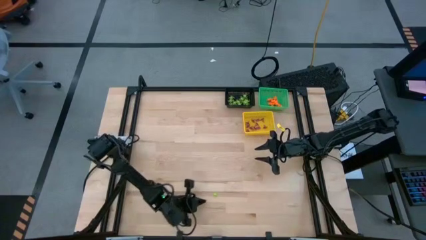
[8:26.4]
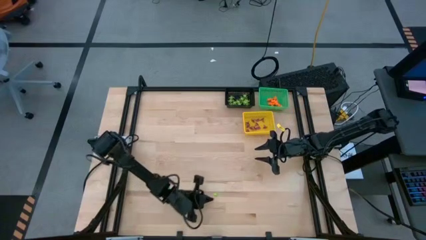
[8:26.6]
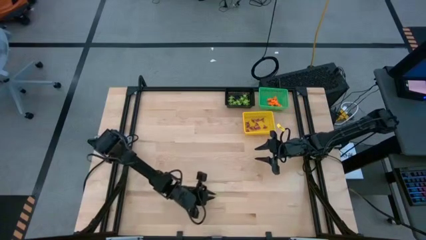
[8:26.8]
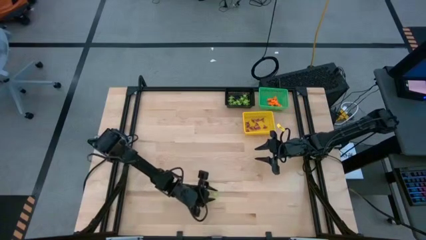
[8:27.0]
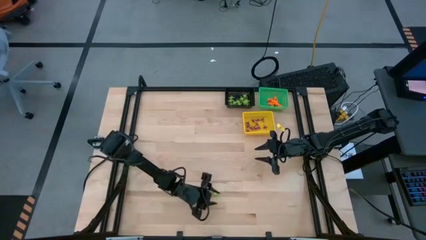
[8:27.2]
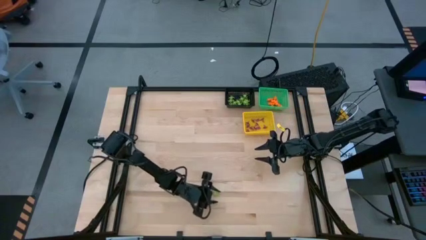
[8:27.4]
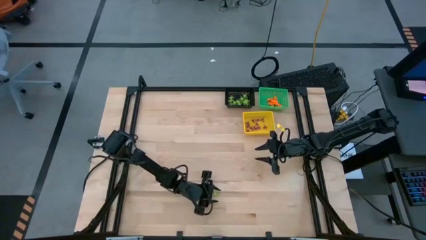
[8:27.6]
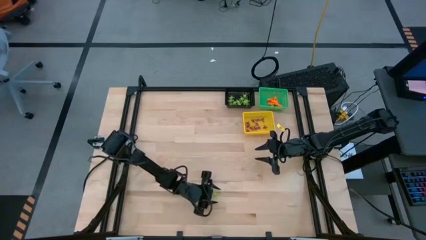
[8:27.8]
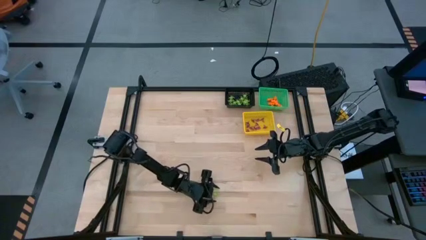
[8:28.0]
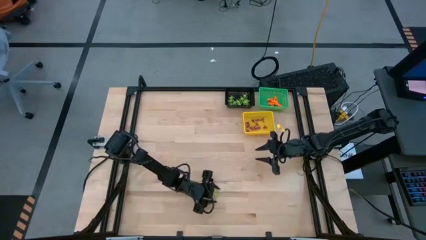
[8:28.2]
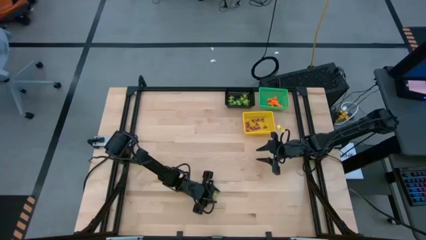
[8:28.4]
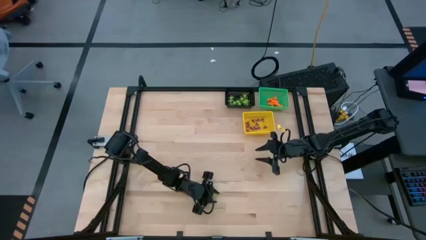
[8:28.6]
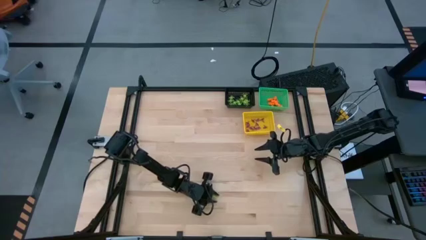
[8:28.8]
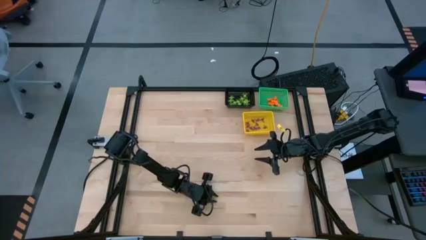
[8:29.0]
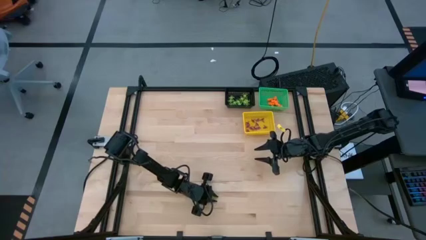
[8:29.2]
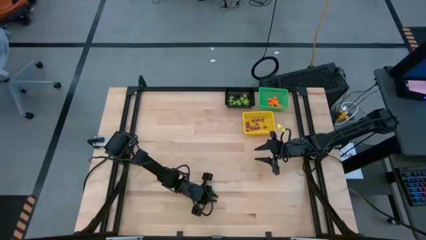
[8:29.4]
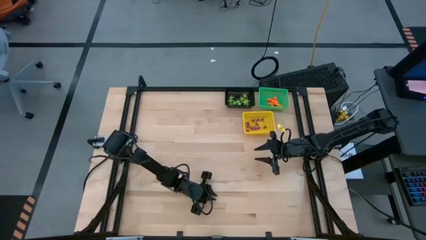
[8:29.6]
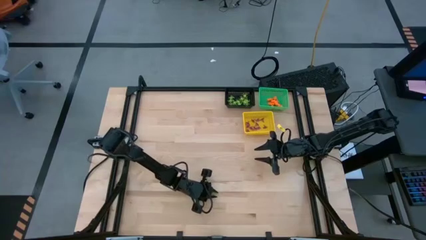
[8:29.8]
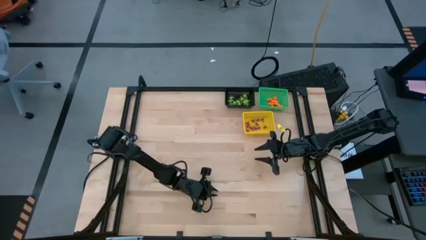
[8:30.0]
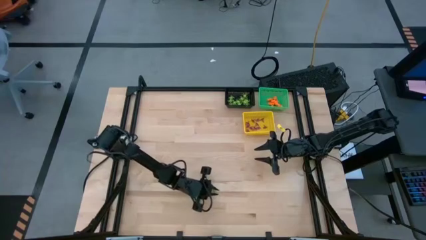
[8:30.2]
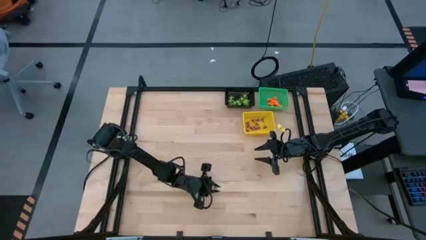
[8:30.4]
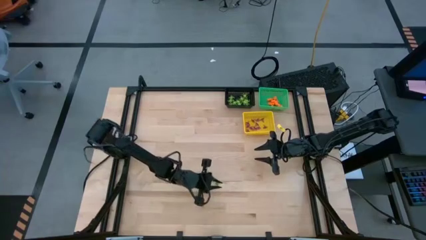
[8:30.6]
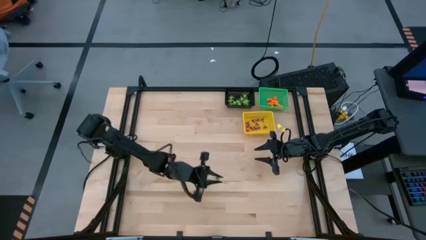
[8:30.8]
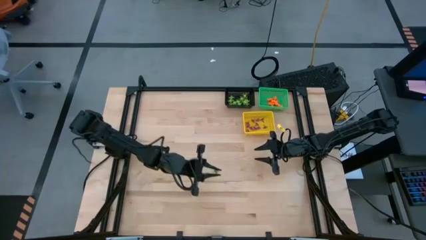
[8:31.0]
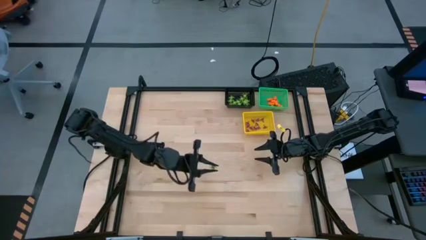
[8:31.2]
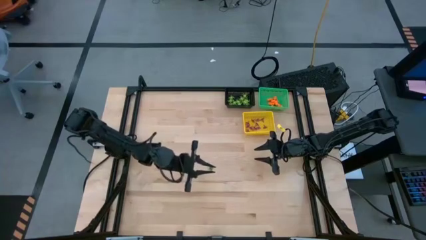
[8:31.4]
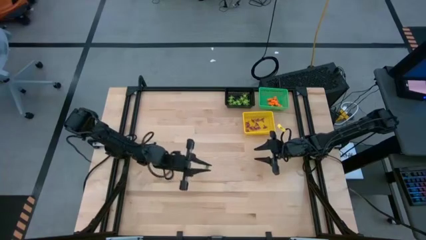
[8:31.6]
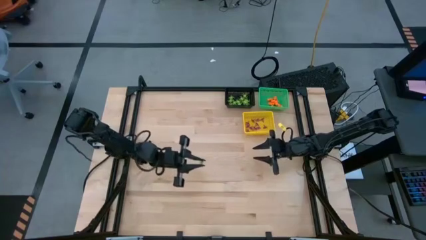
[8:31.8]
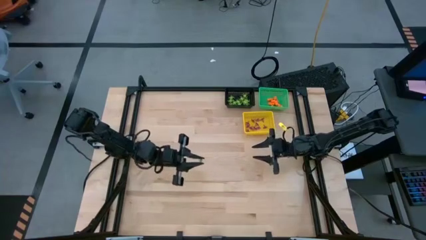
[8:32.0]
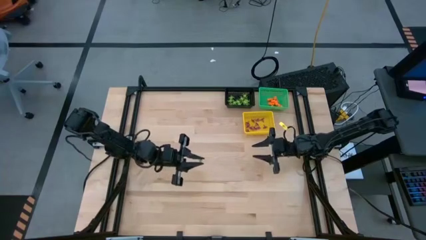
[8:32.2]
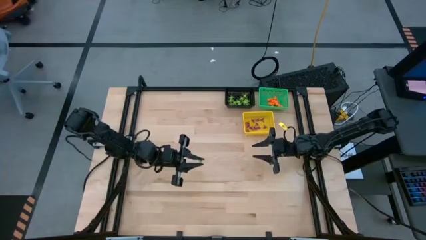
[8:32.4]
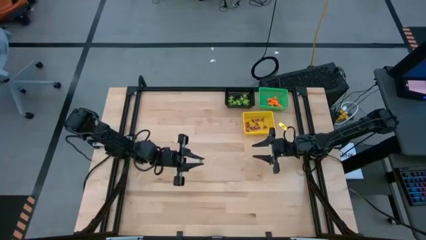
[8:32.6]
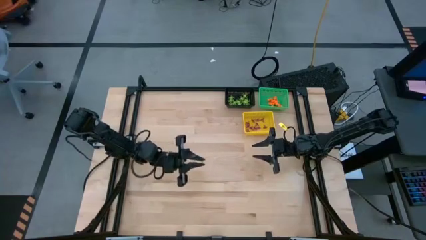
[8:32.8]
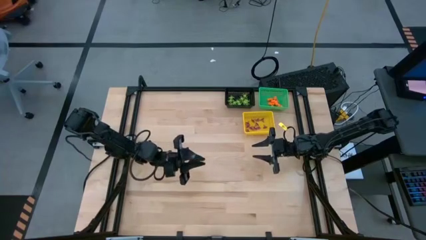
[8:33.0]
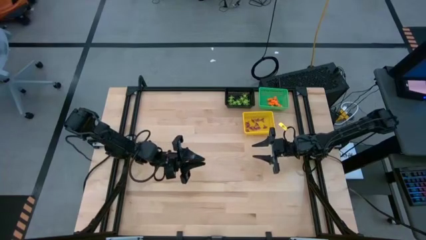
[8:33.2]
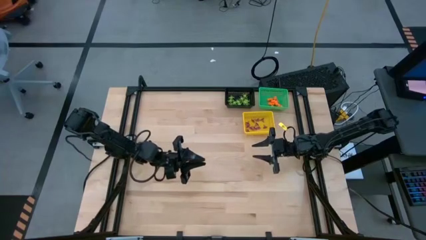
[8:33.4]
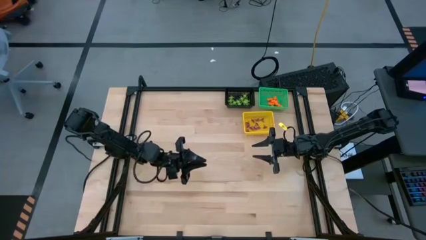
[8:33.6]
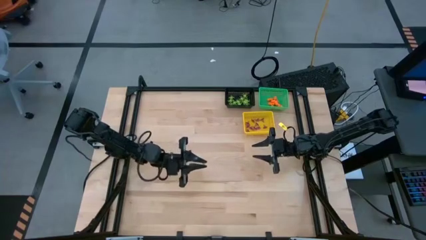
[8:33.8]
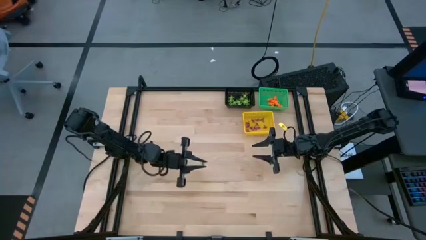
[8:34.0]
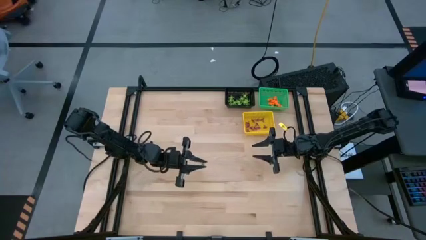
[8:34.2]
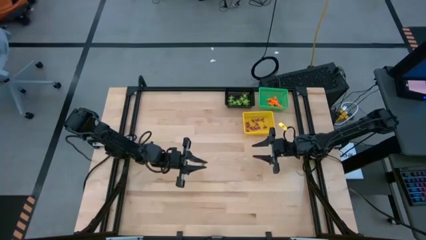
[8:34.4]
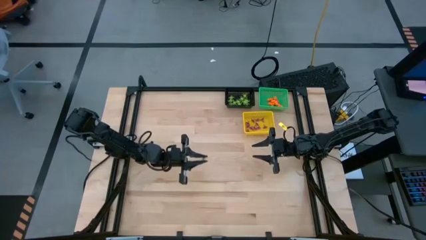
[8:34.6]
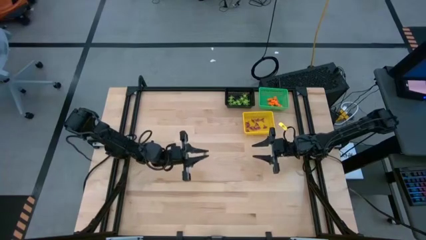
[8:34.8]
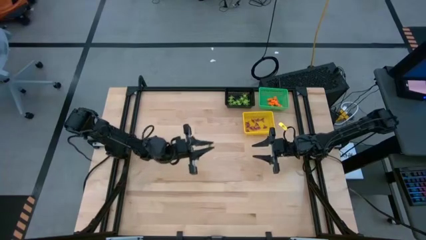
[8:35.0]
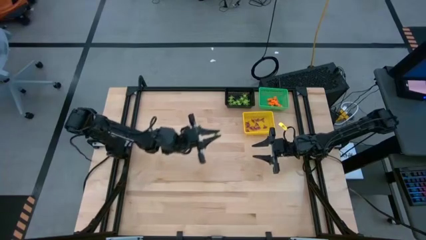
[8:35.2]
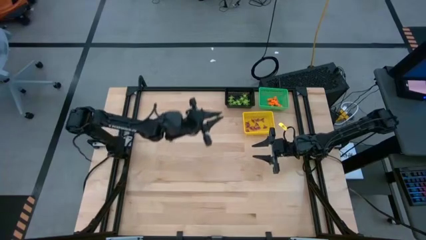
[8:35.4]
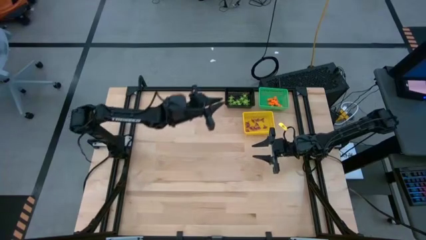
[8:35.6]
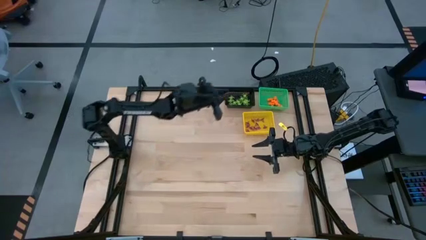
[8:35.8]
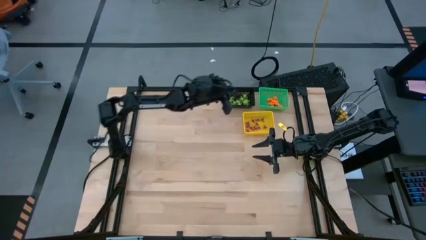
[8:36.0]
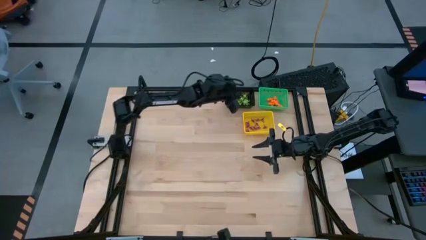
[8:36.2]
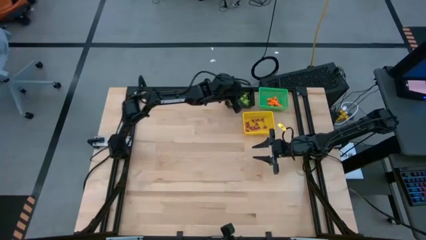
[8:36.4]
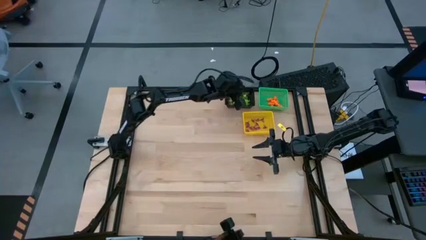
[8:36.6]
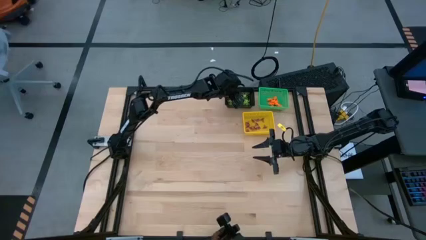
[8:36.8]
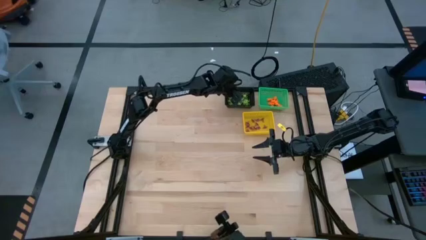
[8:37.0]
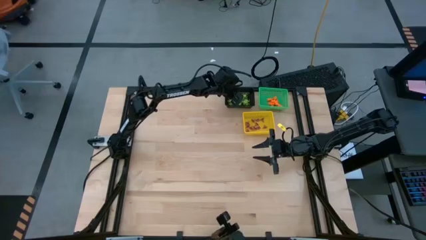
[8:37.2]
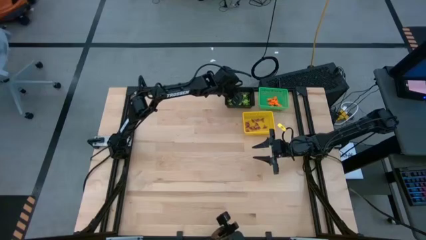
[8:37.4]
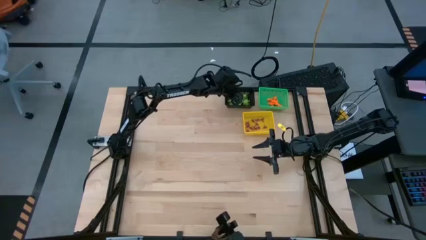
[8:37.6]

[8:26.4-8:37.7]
Task: Sort Halloween decoration
Put the green spider toy into the black basket

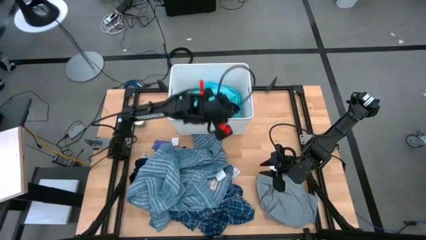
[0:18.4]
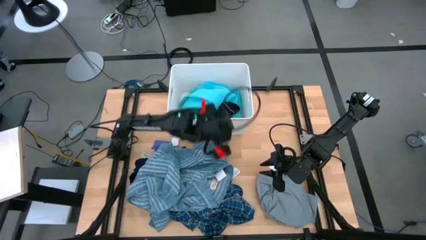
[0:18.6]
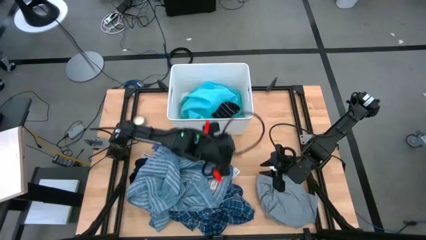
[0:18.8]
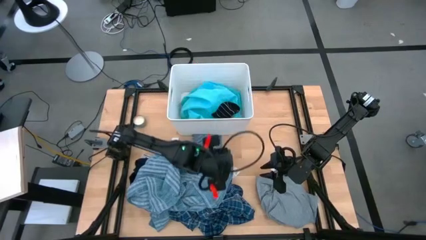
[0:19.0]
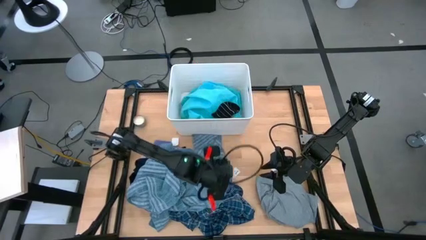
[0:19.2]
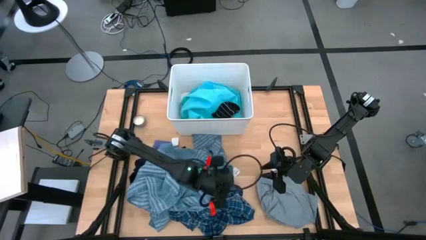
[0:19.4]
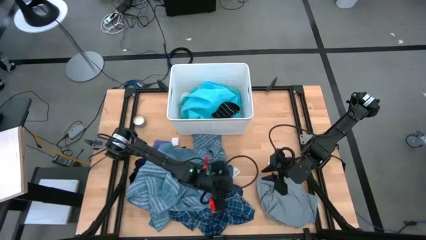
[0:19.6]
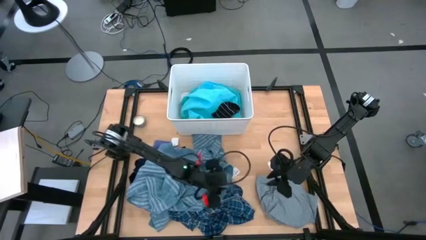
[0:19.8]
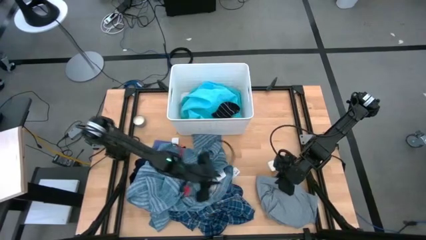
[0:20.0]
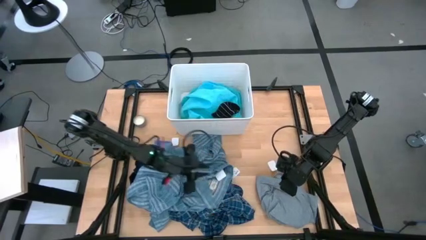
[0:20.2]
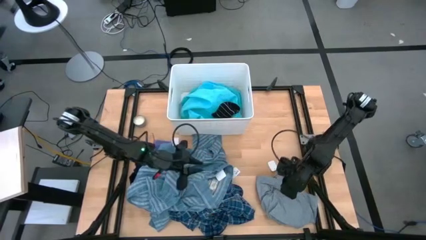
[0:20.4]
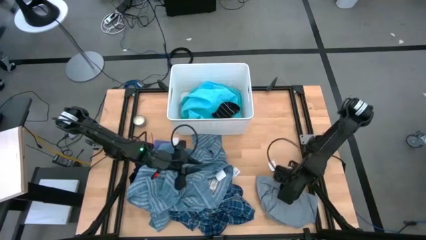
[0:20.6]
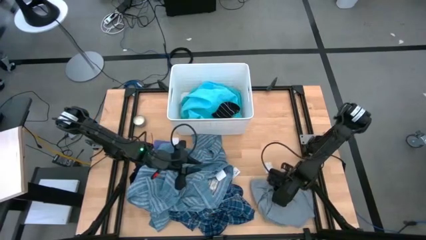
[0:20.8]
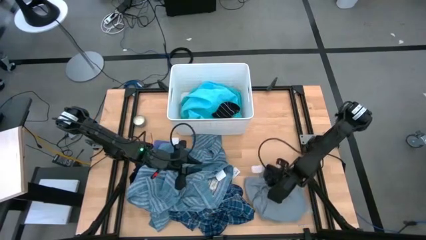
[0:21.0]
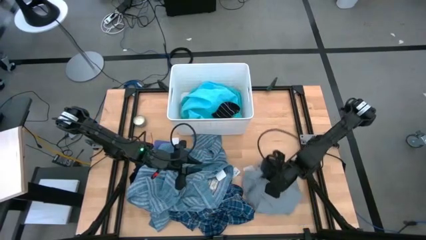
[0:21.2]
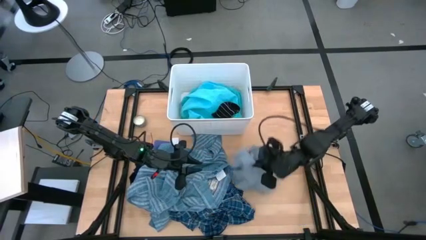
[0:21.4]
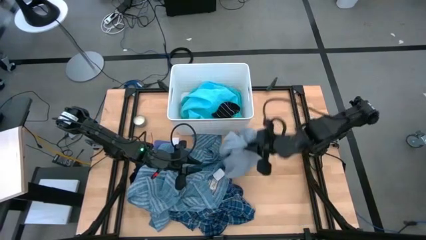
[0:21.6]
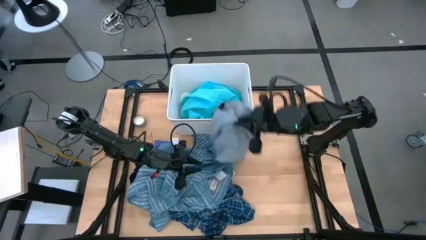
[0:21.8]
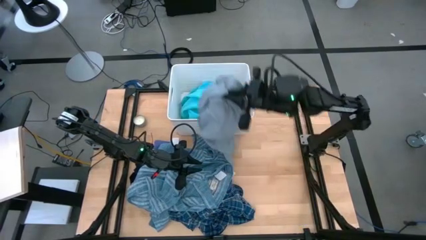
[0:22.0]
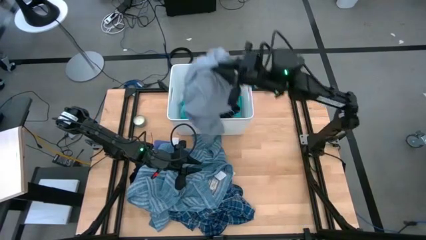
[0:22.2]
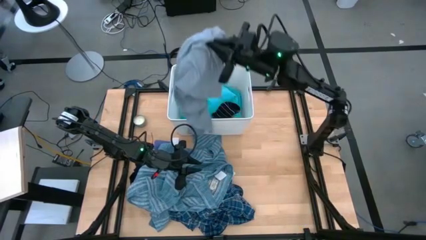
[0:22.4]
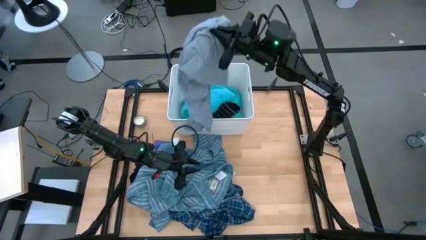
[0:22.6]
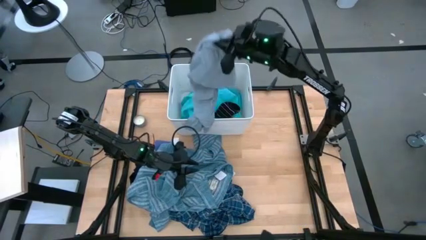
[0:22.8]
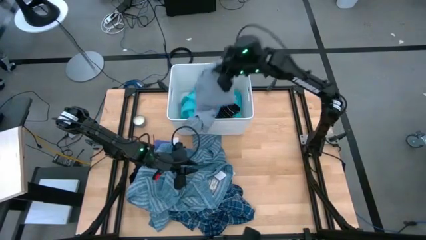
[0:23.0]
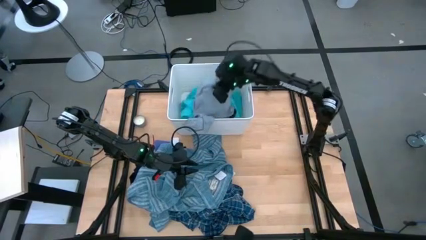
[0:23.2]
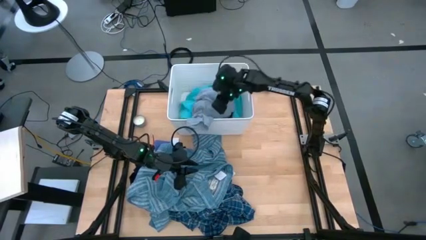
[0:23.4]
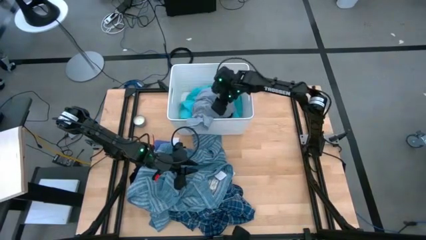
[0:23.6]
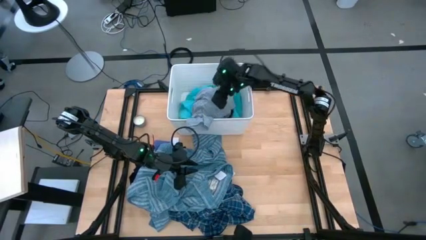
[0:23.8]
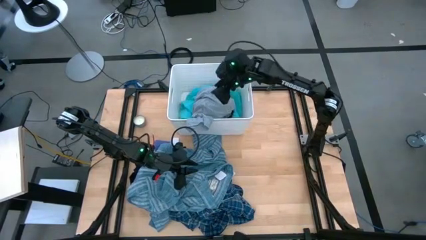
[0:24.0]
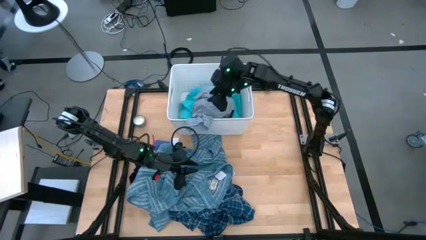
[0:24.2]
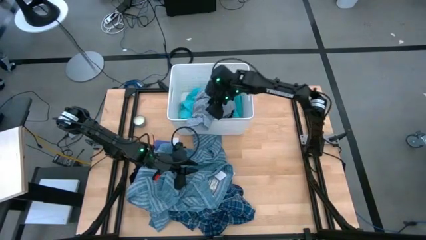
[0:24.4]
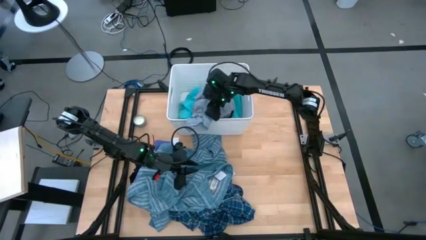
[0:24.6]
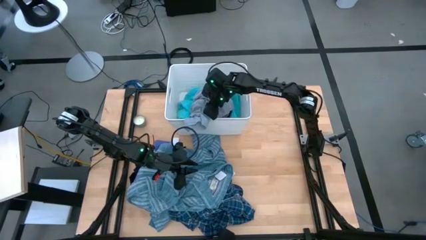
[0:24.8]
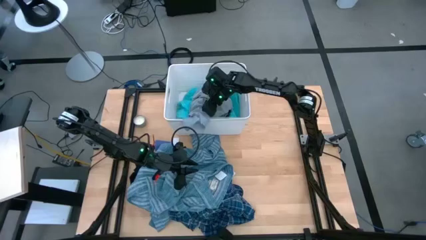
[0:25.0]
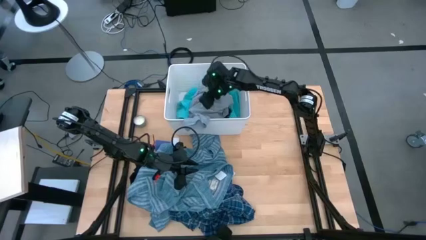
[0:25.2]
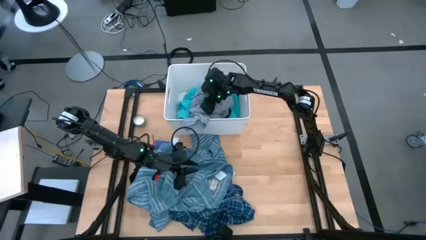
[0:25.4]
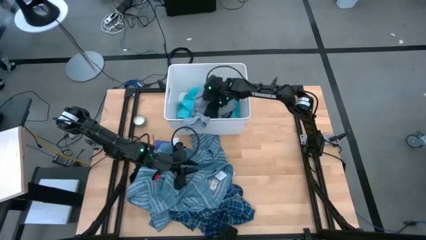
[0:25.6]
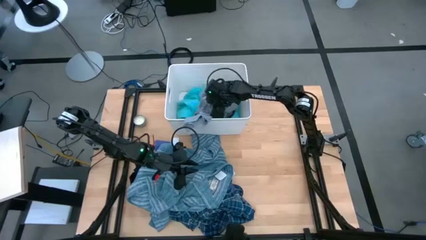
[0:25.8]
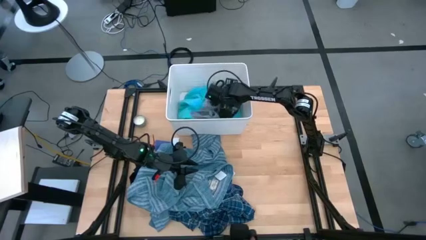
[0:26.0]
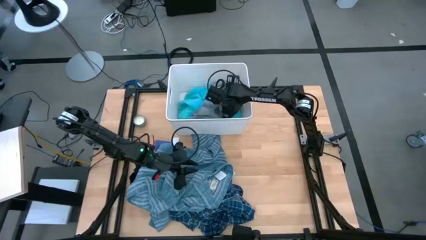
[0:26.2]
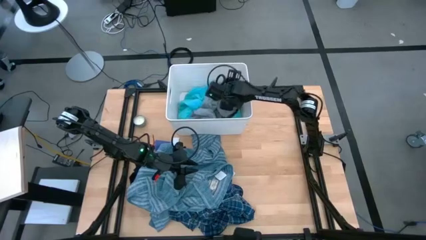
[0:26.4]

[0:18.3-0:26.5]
Task: Sort clothes
Put the gray shirt into the white laundry bin
